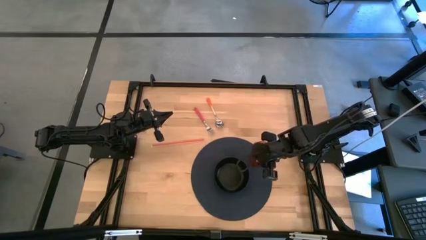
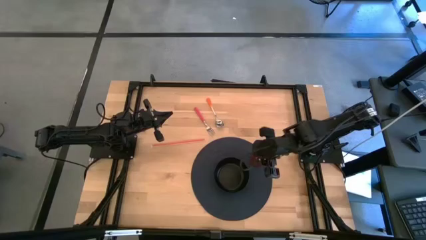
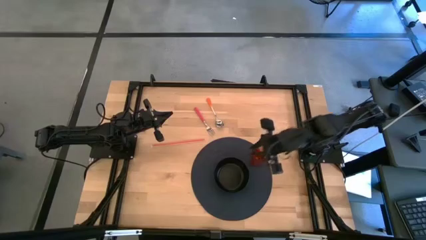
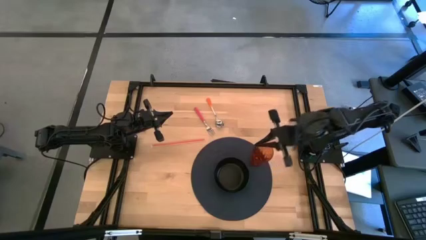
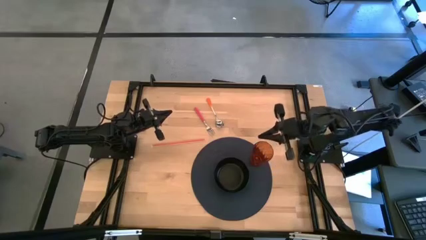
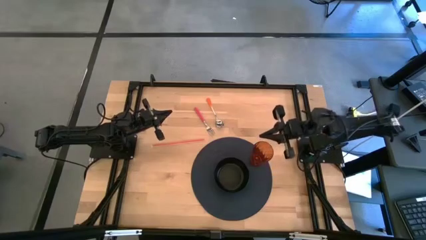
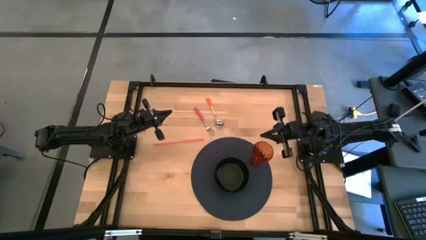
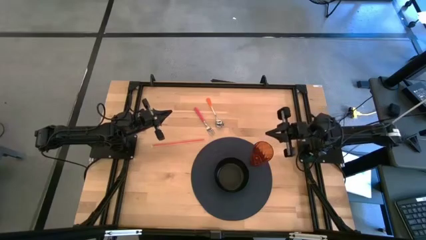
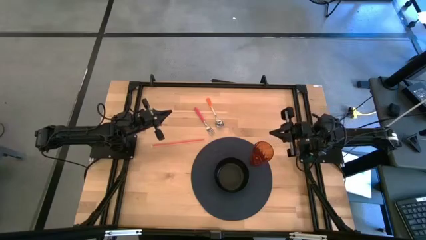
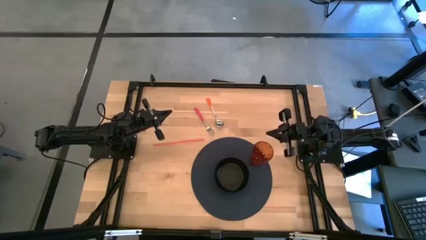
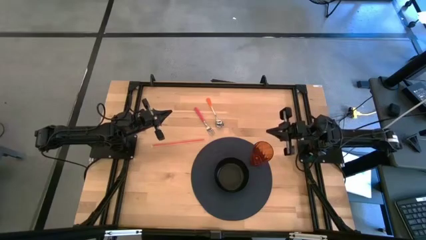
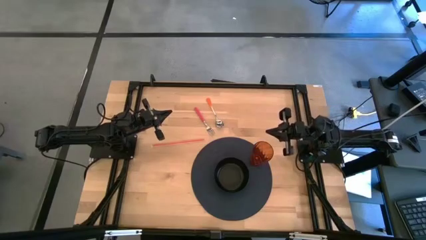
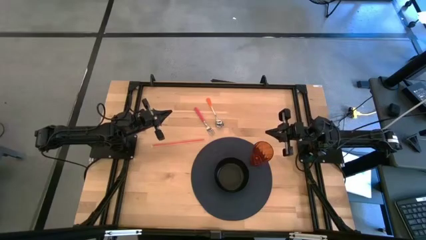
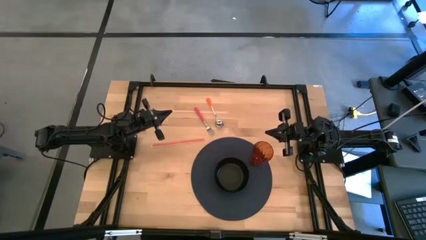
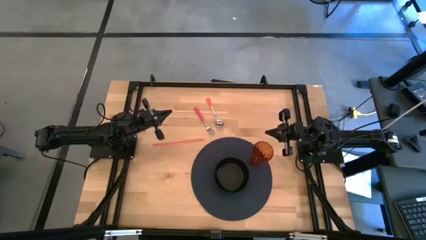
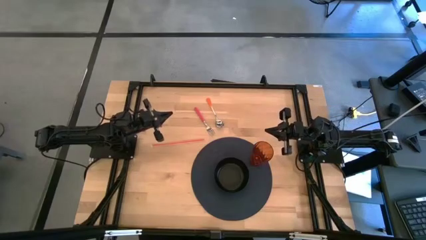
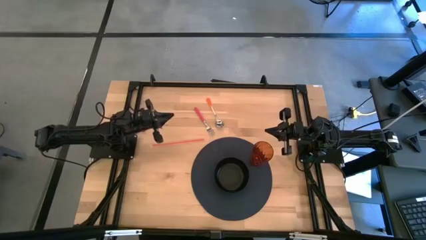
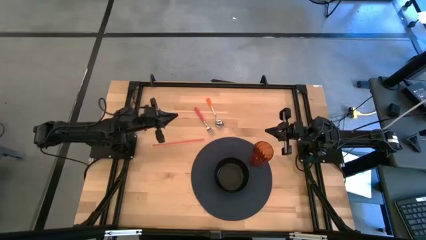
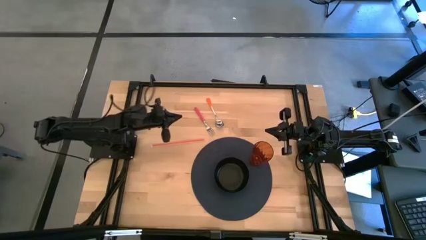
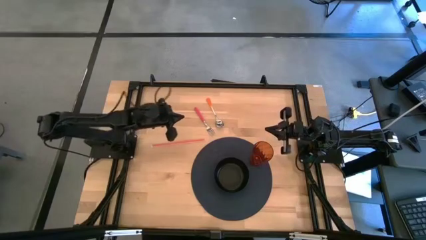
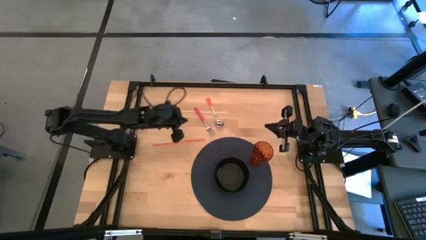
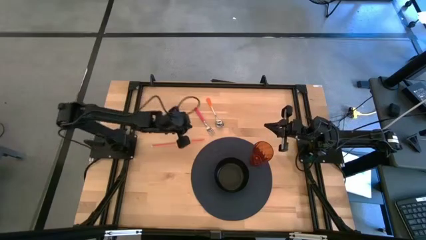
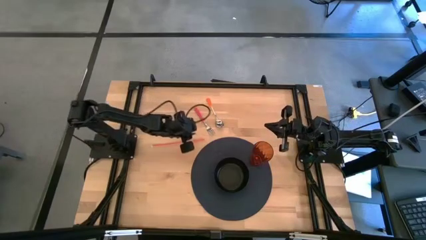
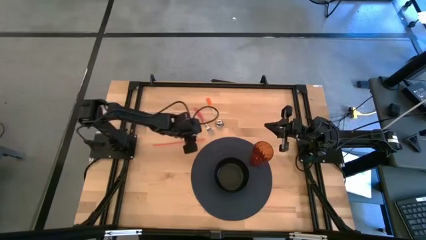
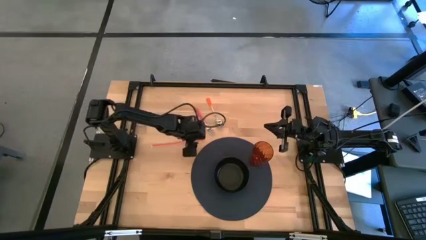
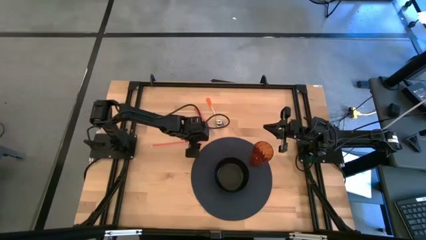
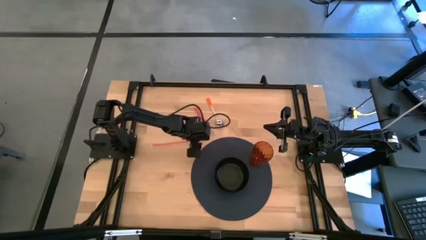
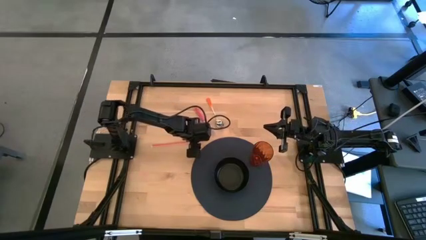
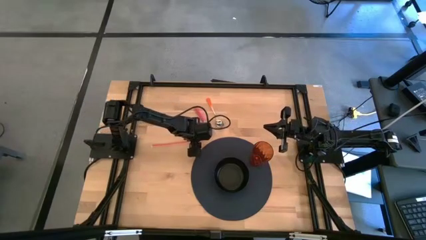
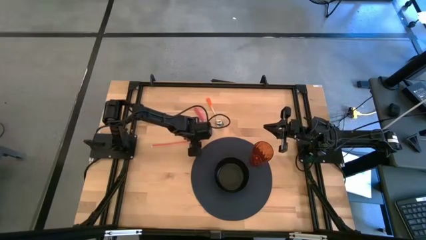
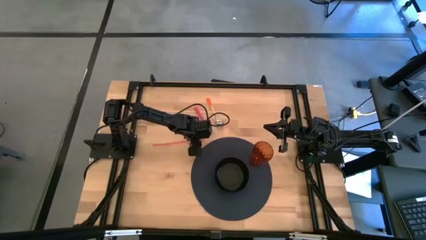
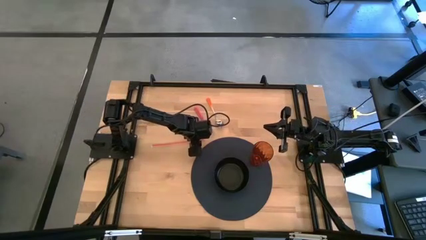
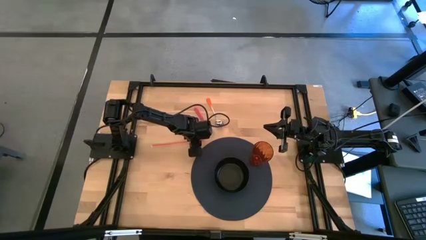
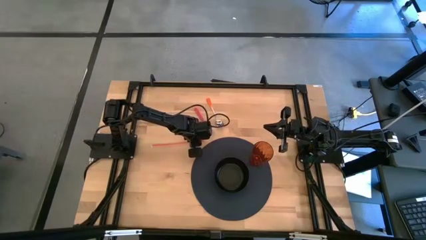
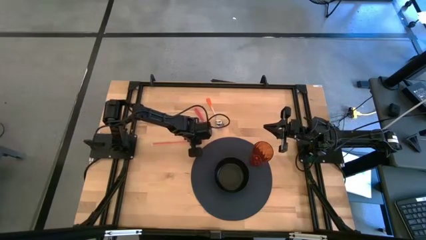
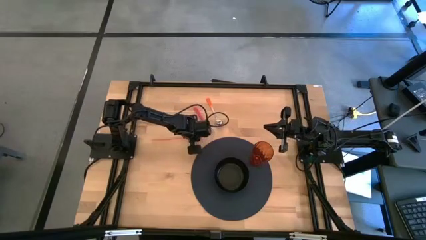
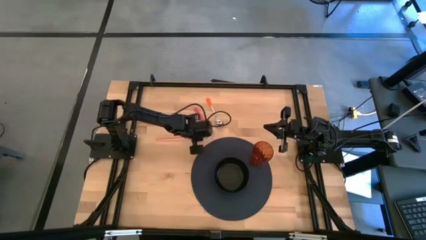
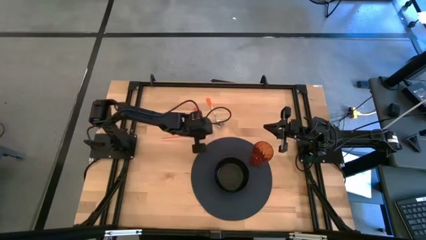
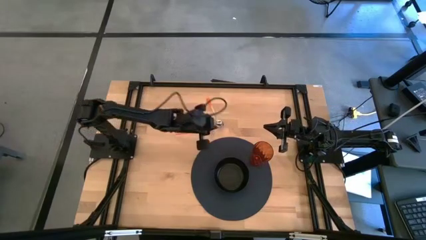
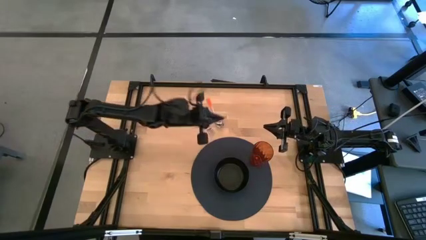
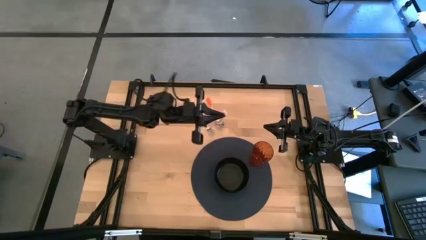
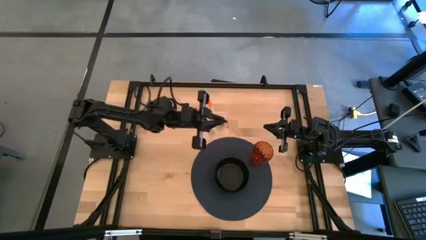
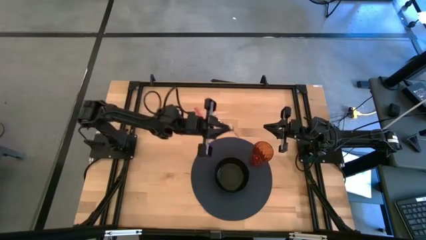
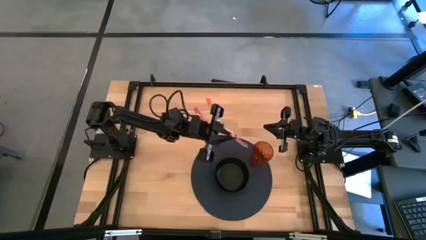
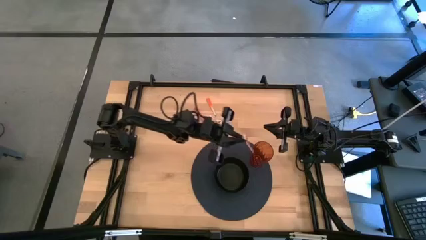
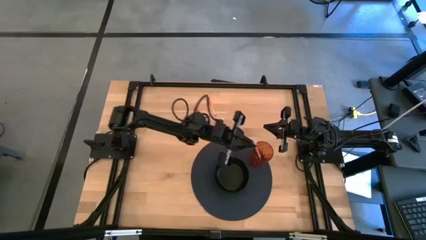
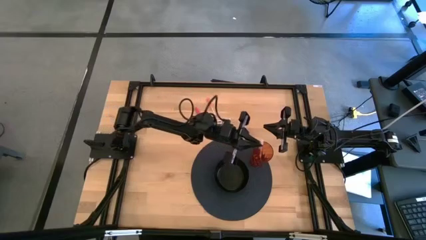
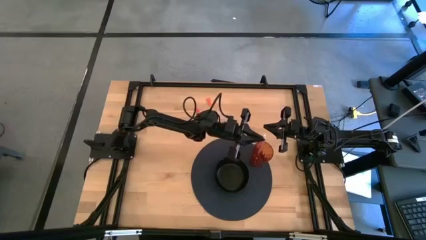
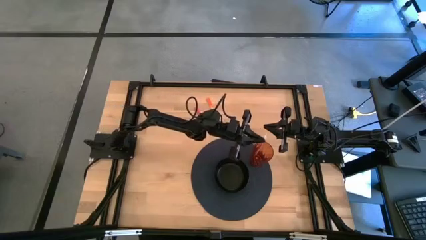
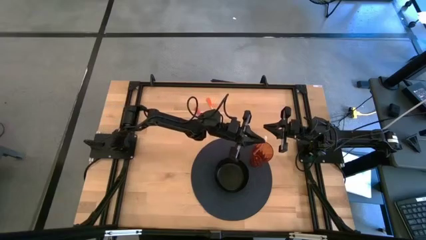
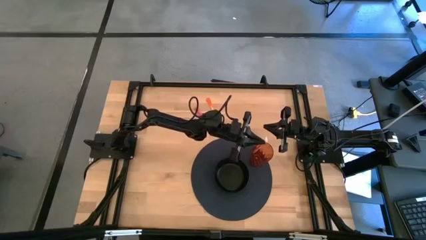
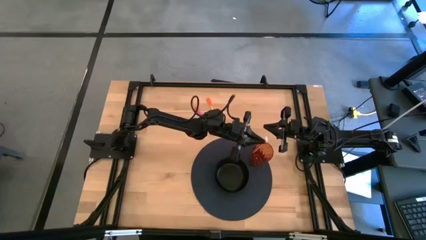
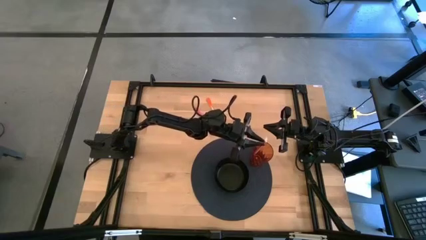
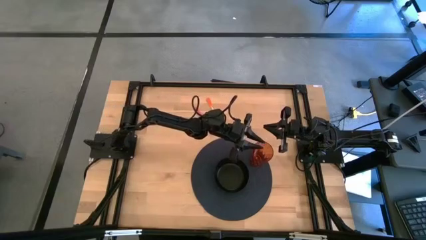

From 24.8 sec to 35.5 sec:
Task: Pick & Place Utensil
Put the orange straw into the orange cup

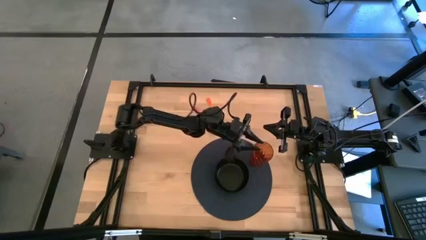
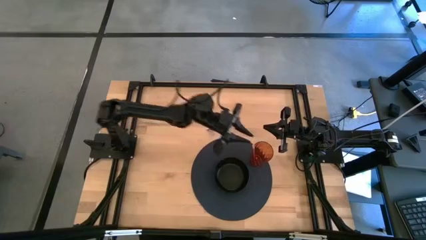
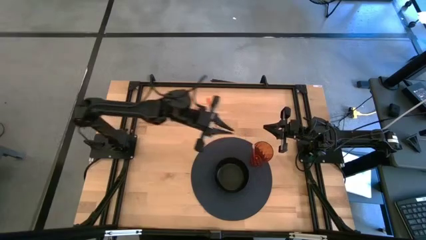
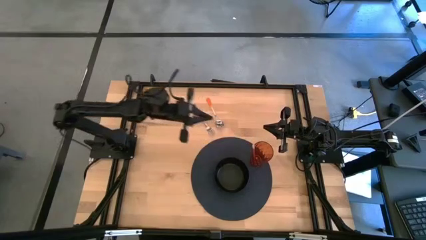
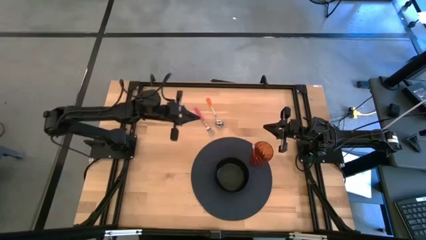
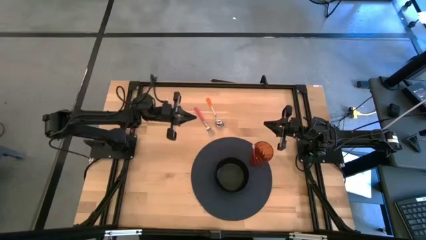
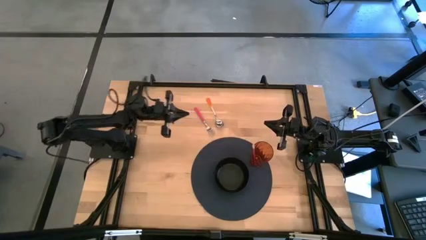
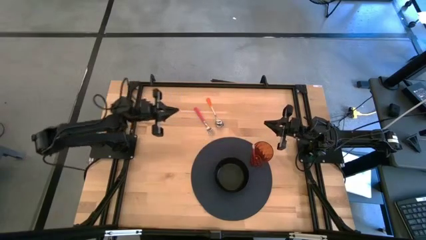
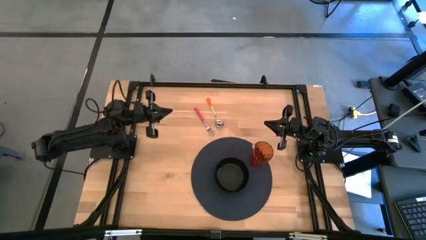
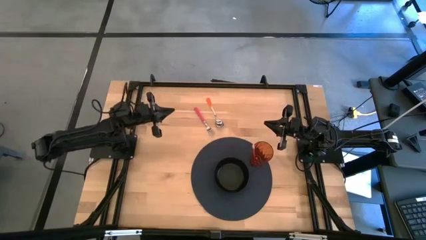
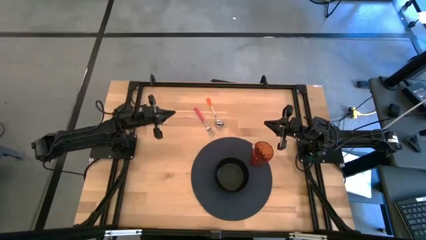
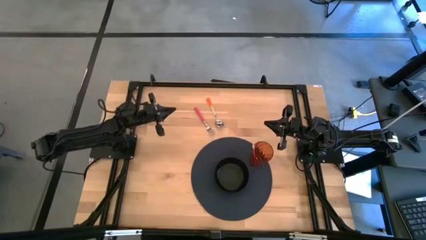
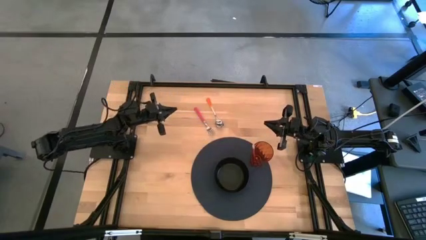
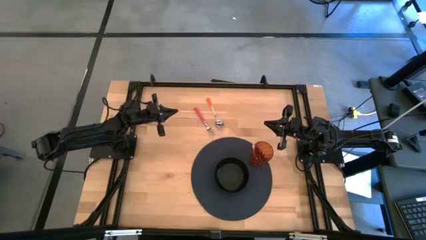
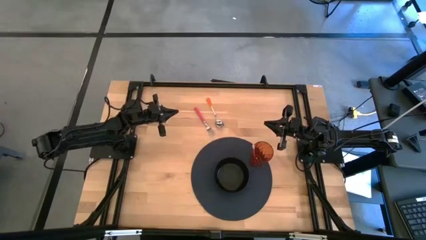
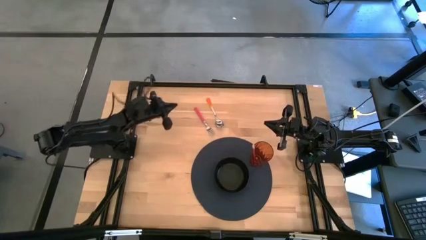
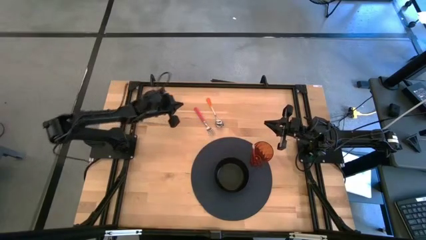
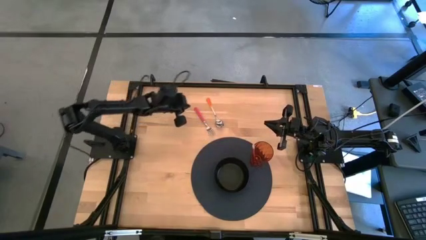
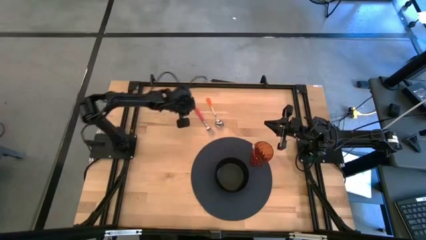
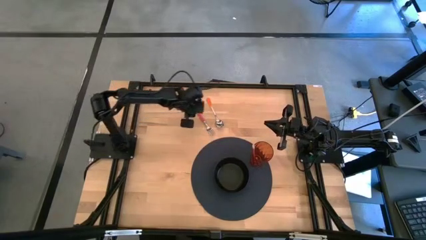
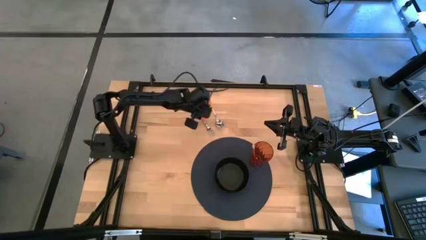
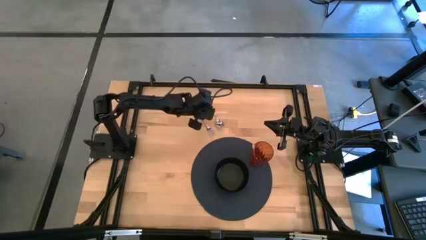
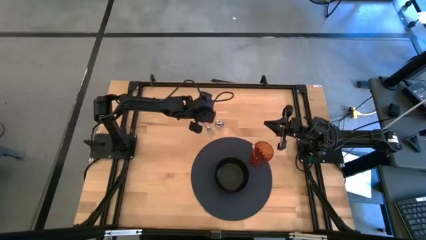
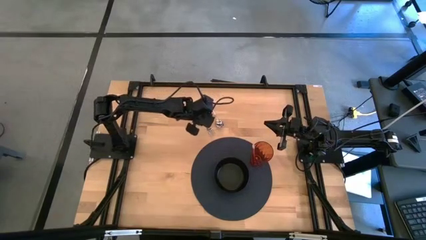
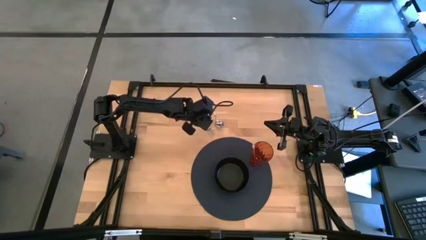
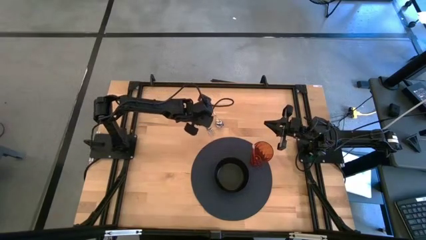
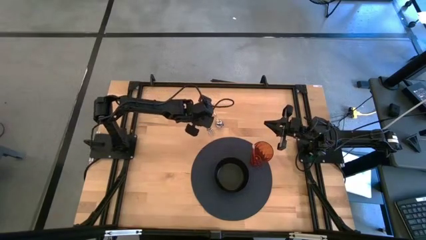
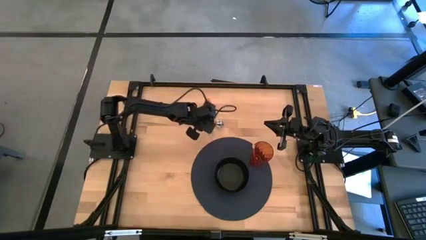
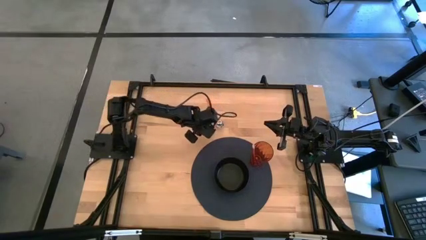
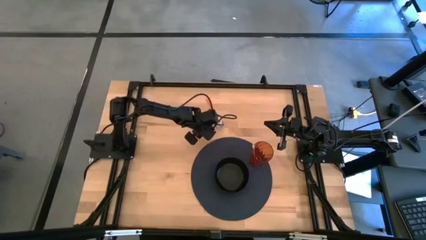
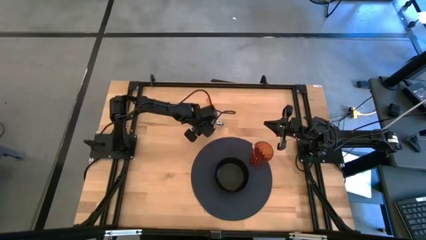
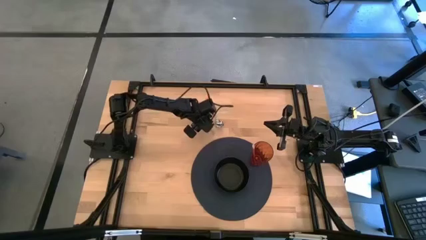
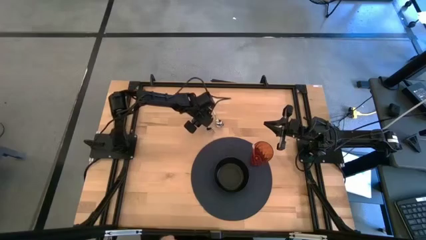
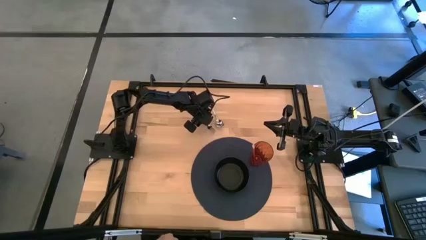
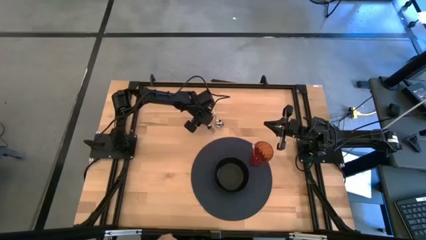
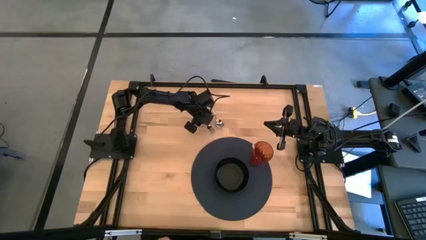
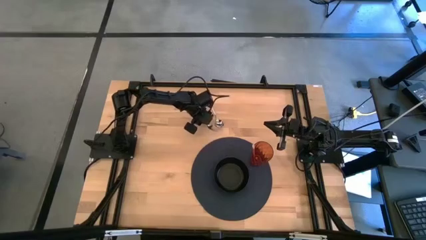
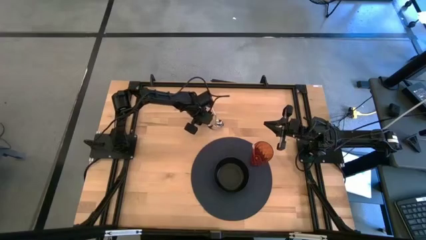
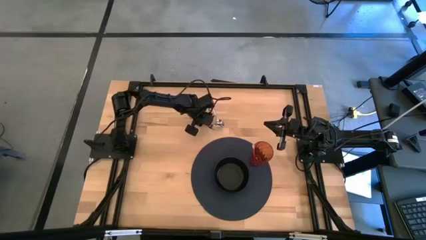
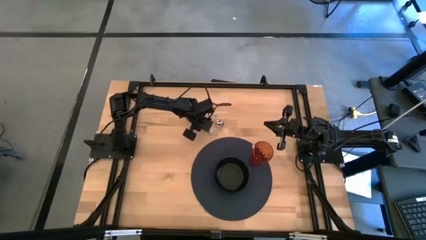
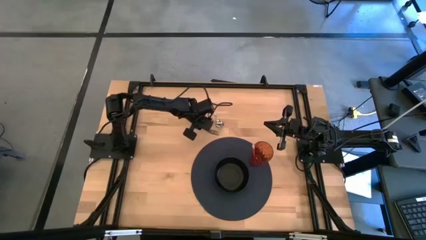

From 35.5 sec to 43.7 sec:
Put the pink fork into the black bowl on the black placemat
